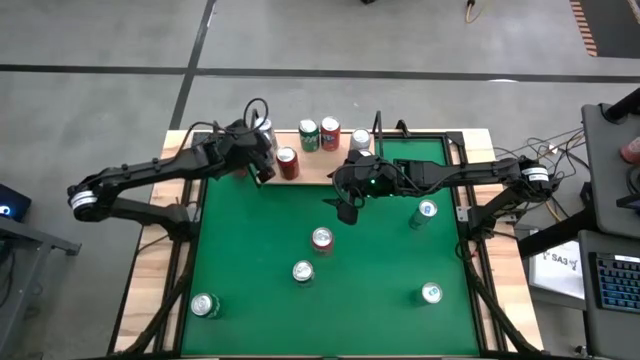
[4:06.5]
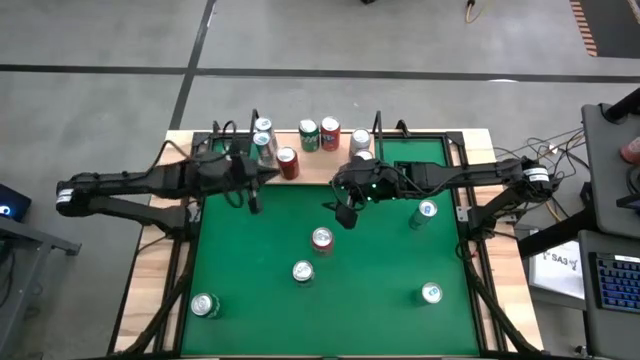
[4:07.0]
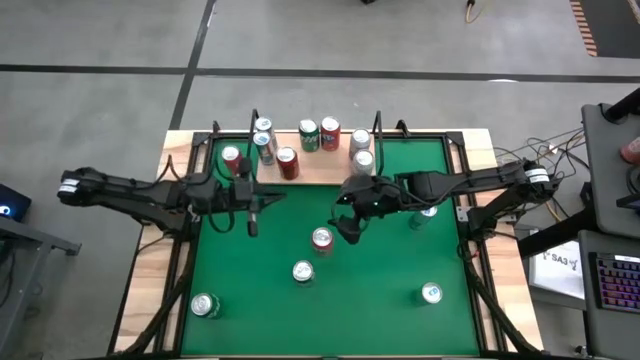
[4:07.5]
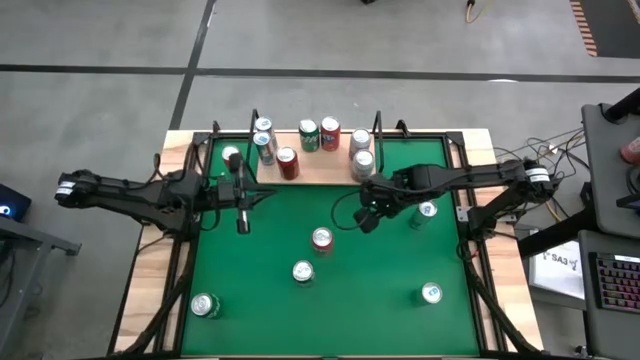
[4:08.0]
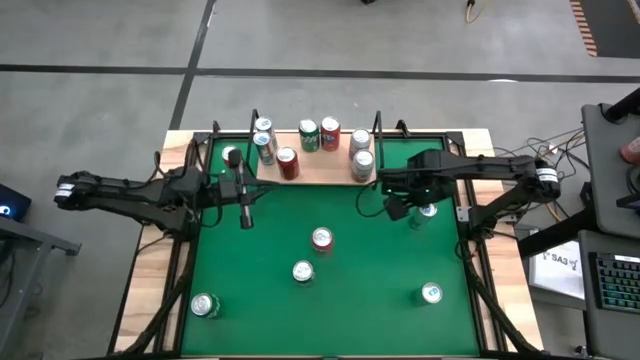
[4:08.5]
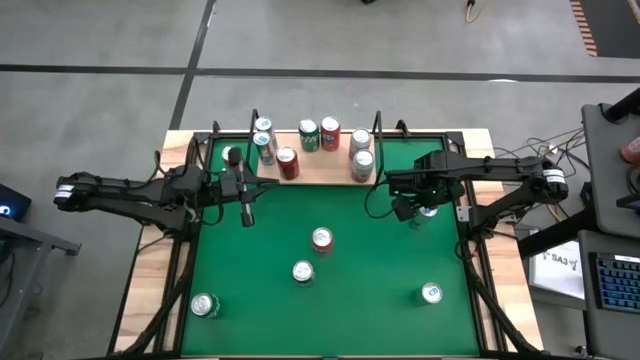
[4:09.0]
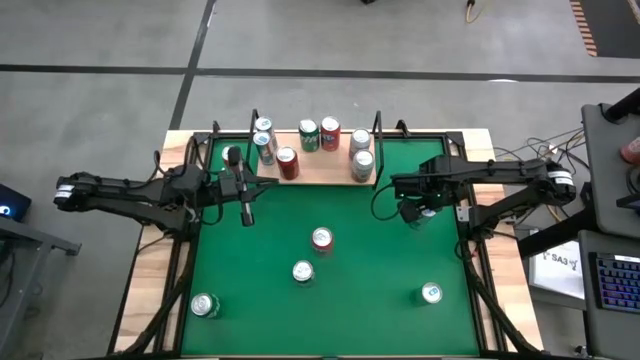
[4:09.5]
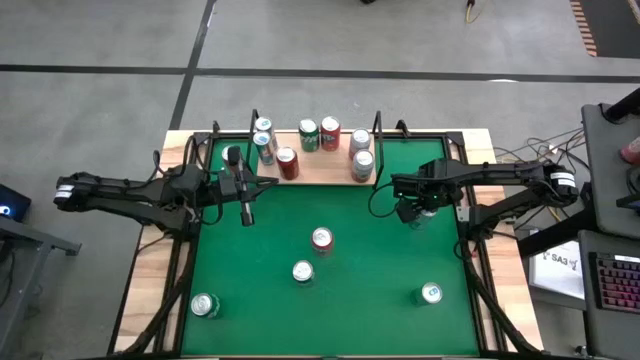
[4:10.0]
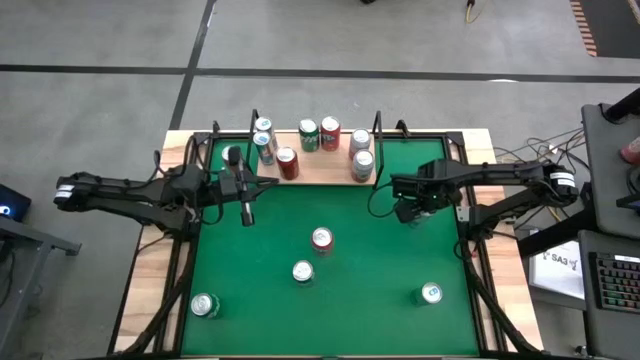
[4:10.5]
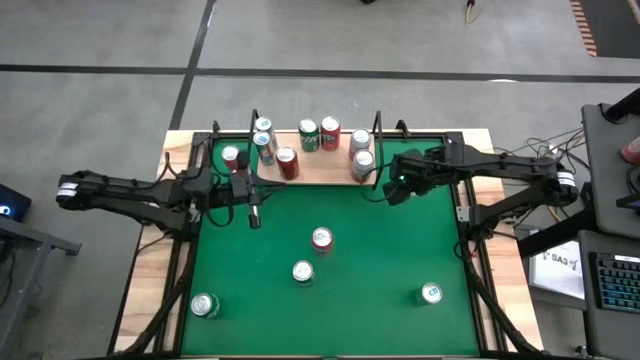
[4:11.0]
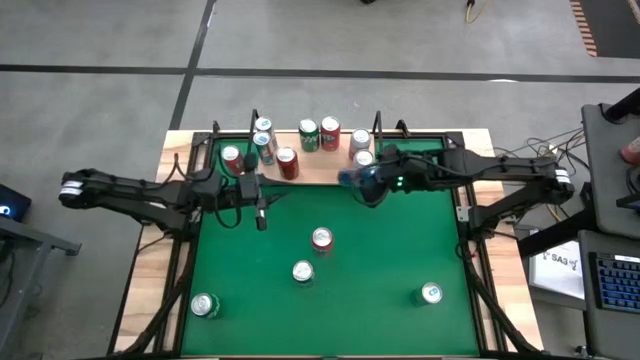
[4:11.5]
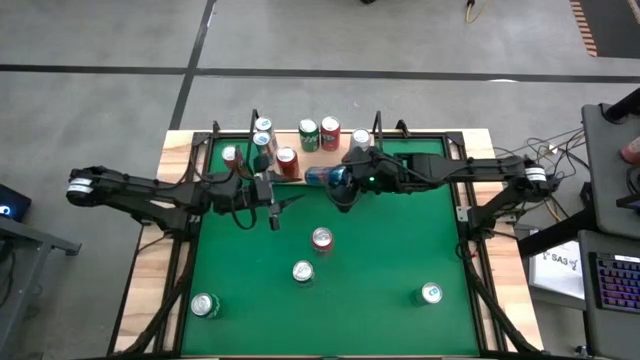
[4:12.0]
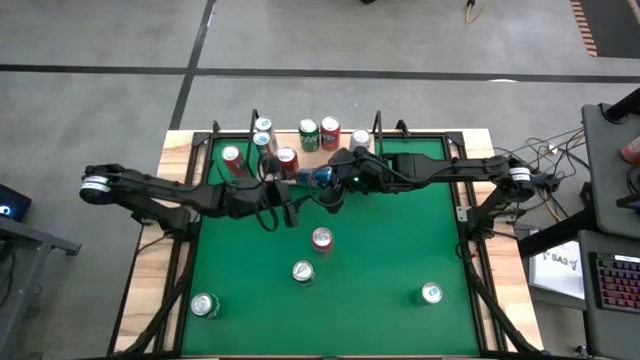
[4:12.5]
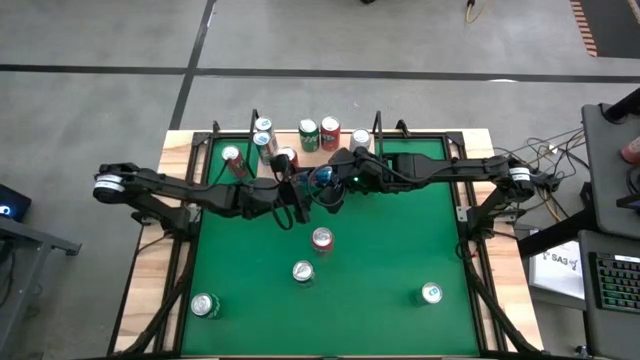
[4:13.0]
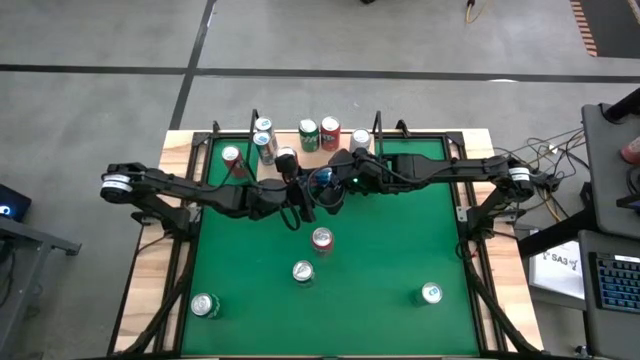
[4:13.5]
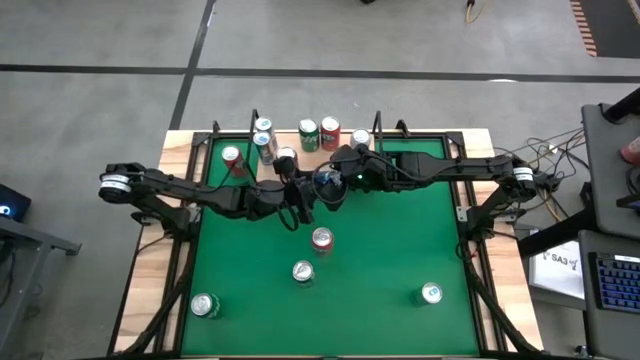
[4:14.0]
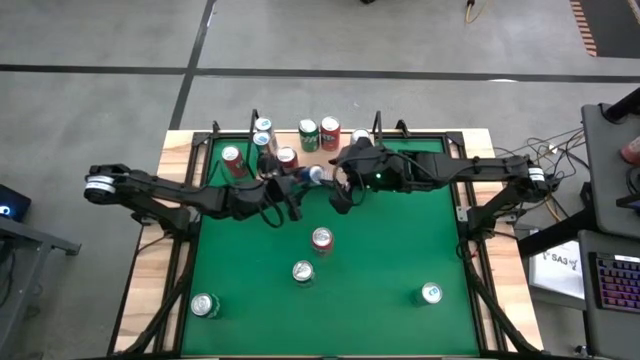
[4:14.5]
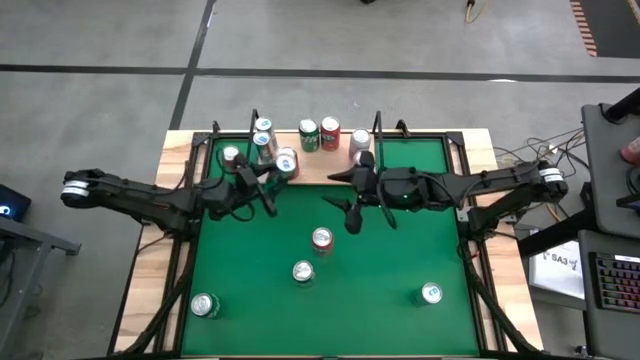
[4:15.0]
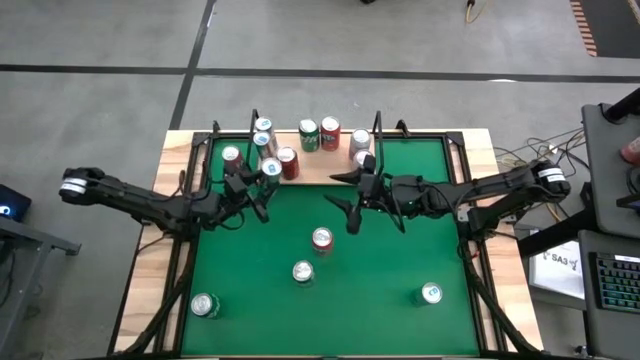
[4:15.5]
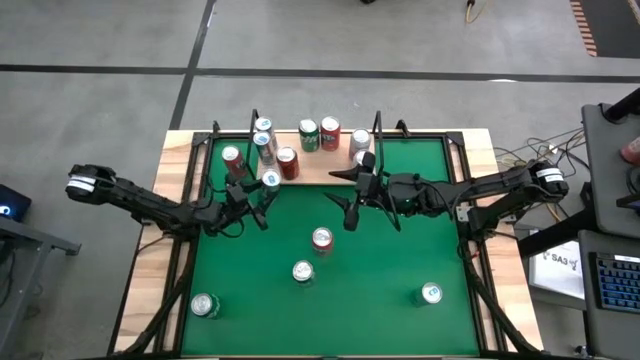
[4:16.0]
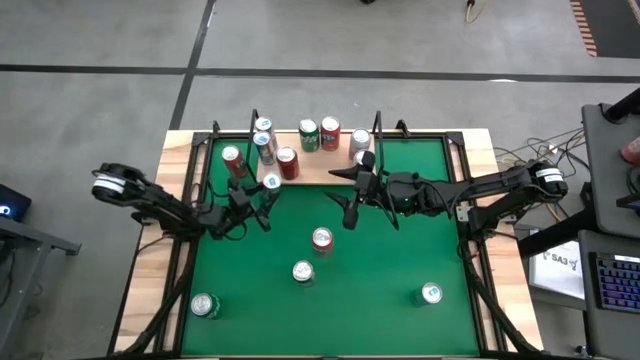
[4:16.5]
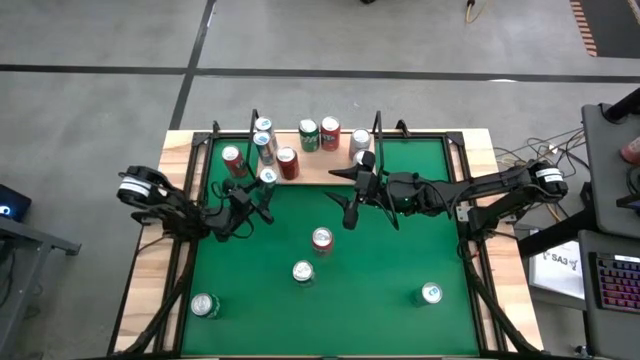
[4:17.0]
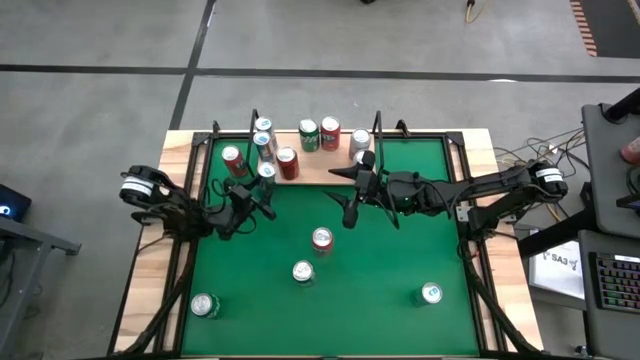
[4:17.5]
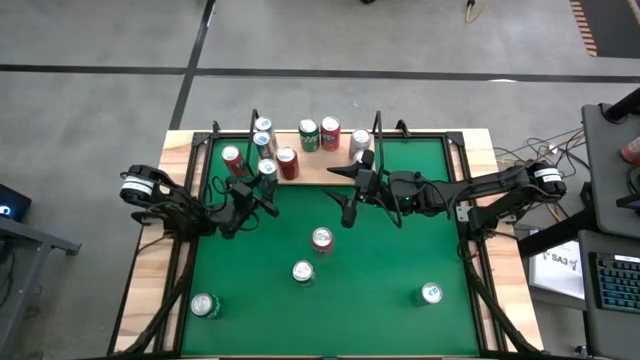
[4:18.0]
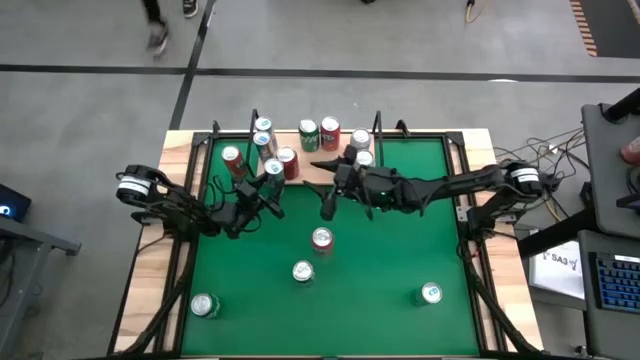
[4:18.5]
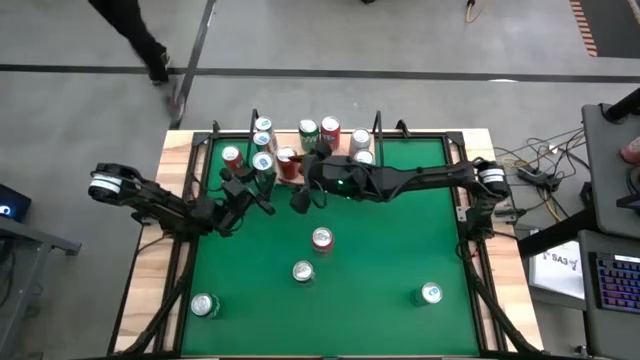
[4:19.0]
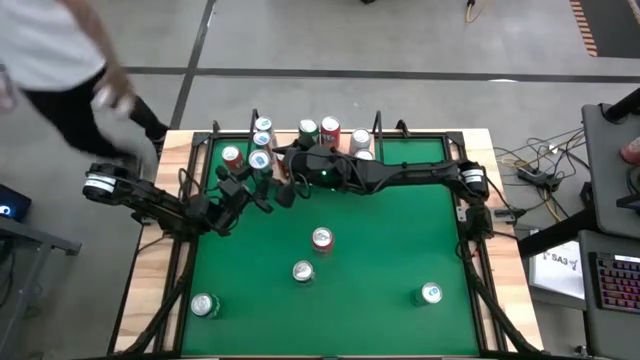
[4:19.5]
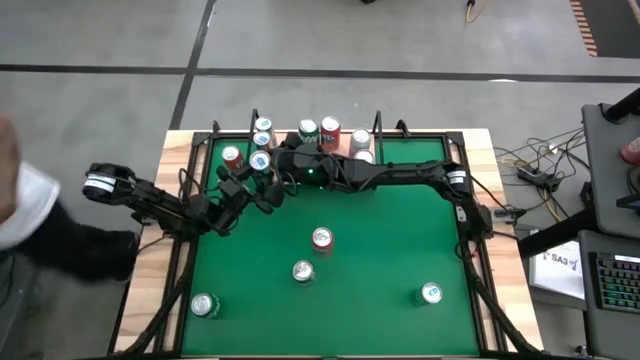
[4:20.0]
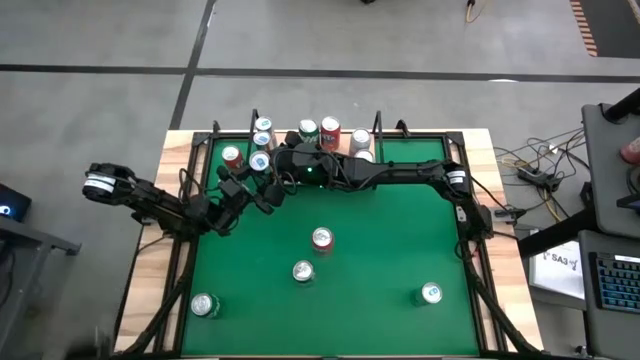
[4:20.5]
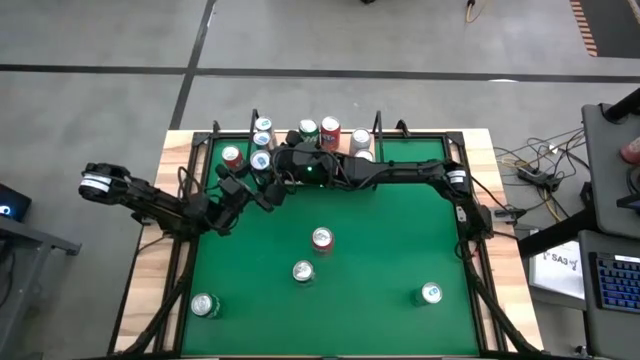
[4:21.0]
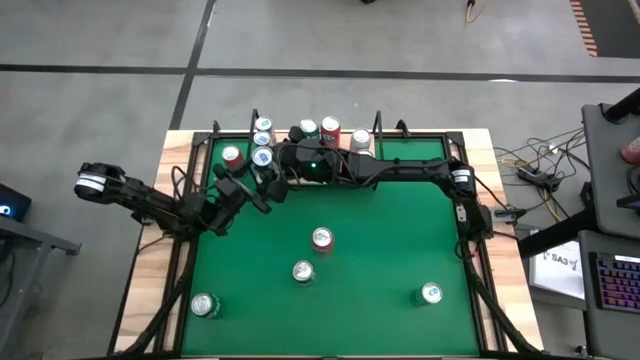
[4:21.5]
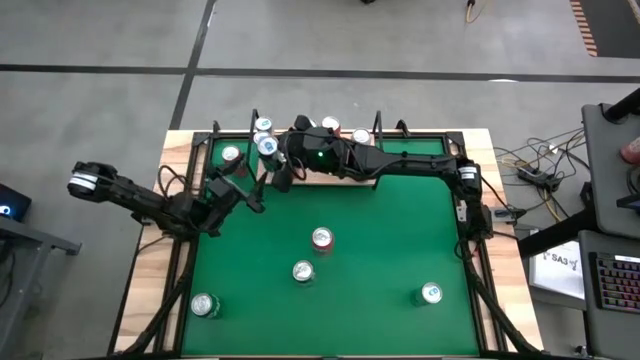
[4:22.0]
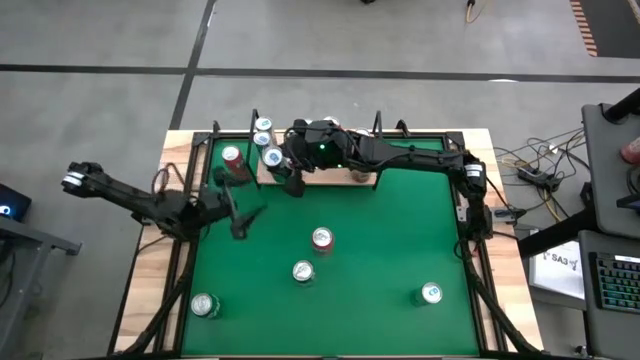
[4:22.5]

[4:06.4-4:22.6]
Task: Pick and place cans onto a shelf
Put the top blue silver soda can on the shelf aligned with the other blue silver soda can

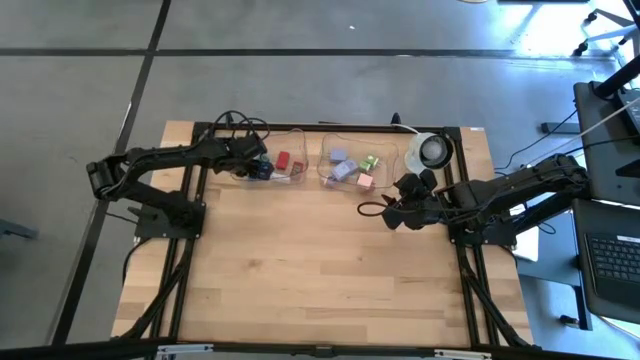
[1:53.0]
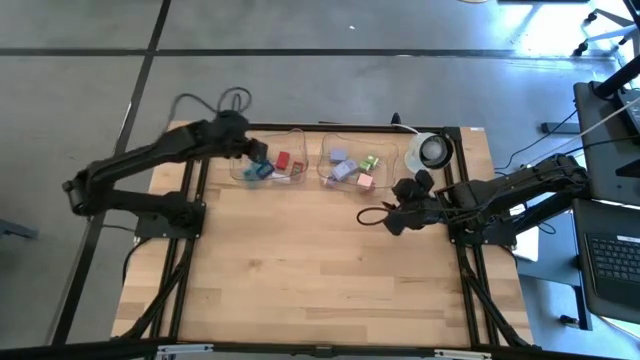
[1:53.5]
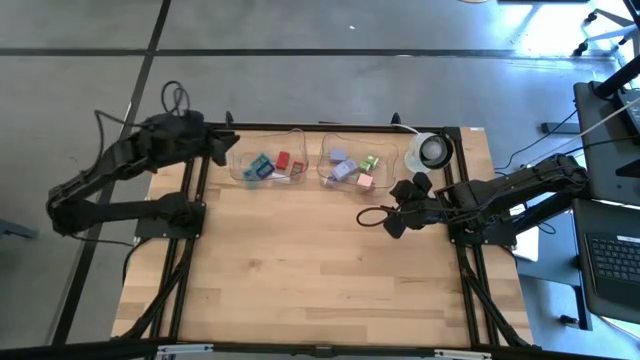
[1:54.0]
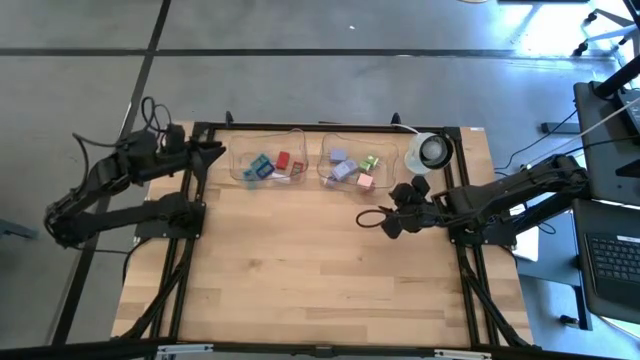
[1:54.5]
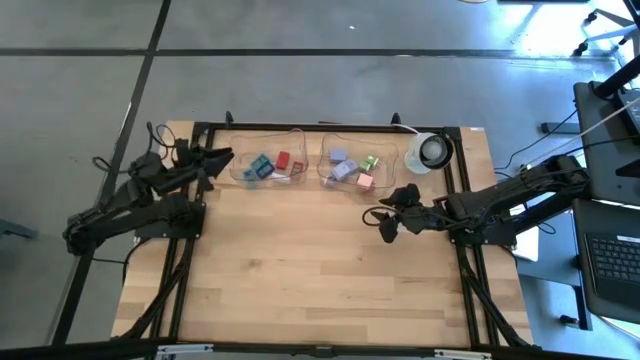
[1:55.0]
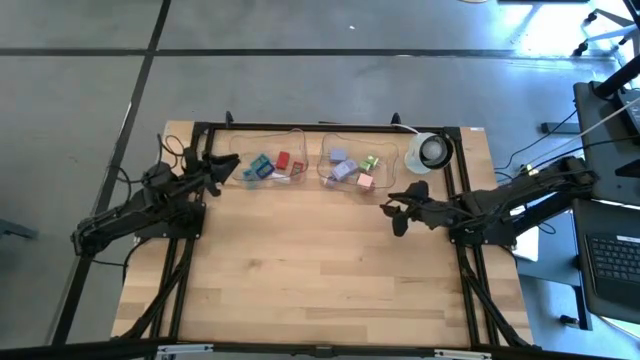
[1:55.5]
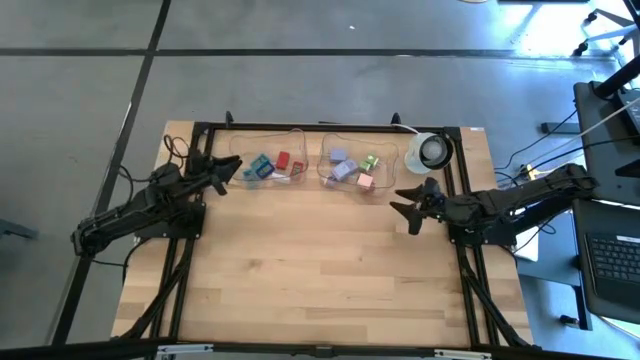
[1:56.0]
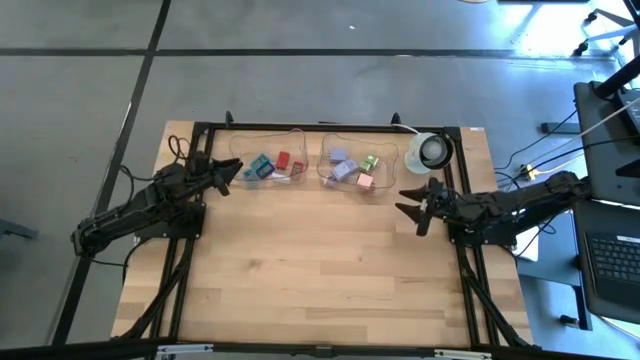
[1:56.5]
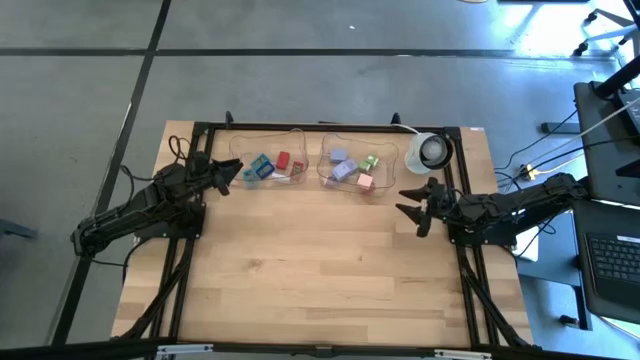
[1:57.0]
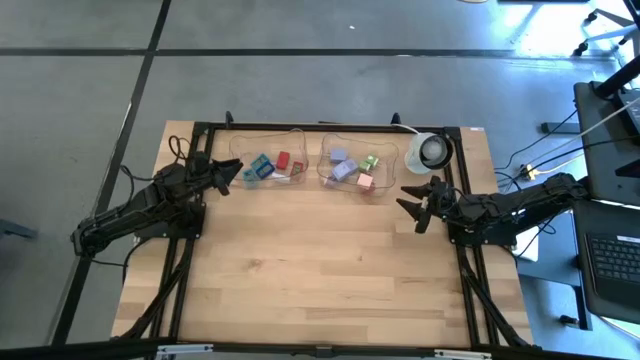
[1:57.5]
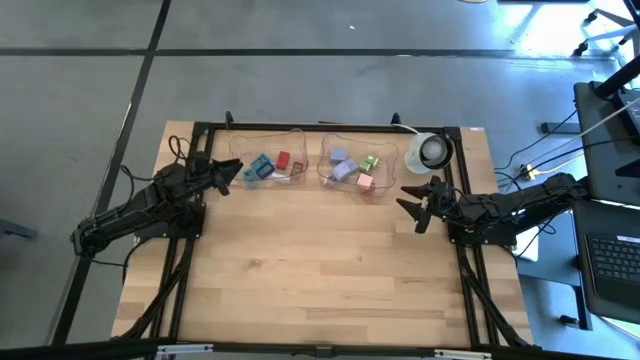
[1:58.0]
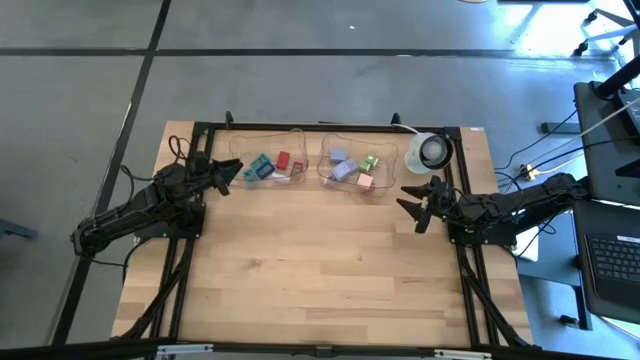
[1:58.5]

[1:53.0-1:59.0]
Task: Pick & Place Office items
Return to Home Position
